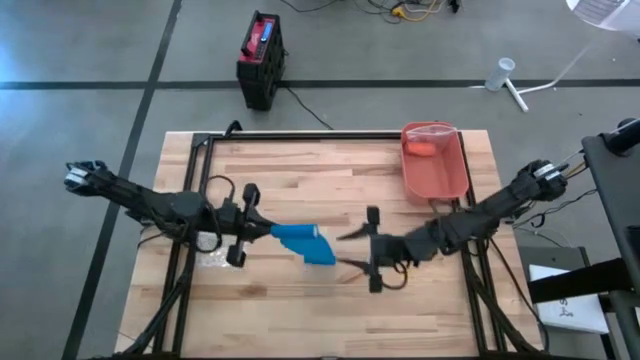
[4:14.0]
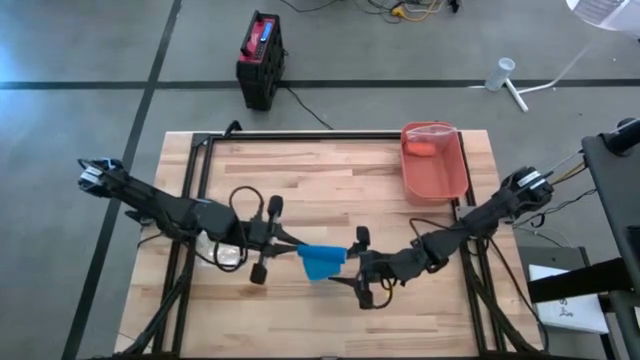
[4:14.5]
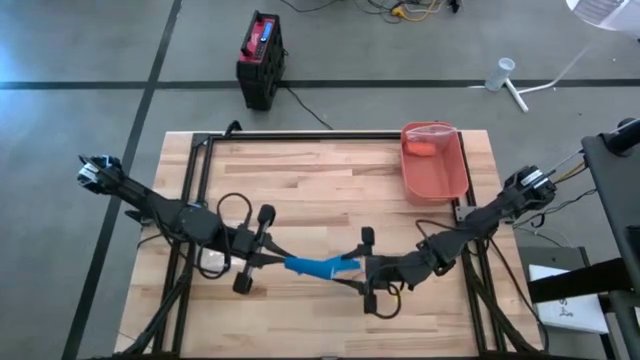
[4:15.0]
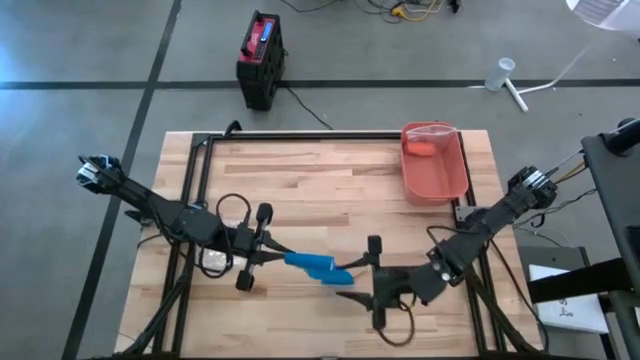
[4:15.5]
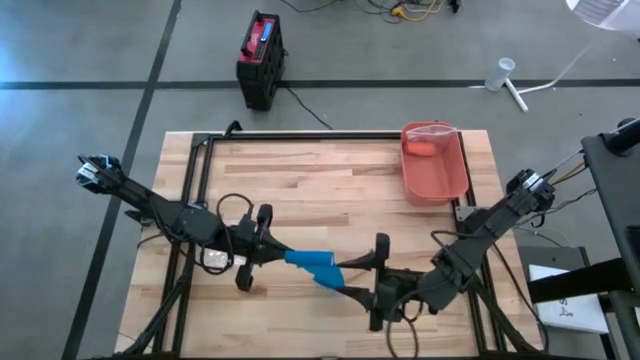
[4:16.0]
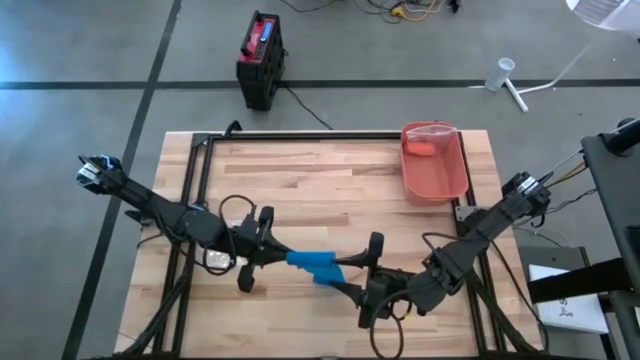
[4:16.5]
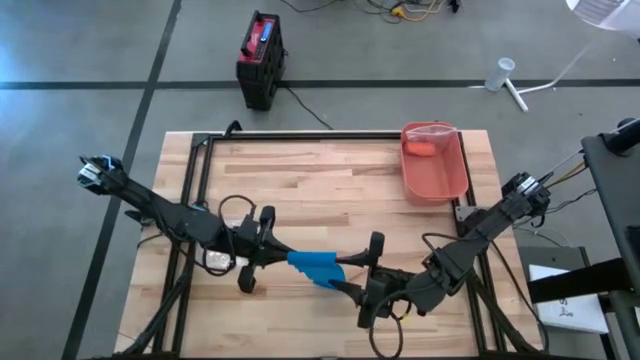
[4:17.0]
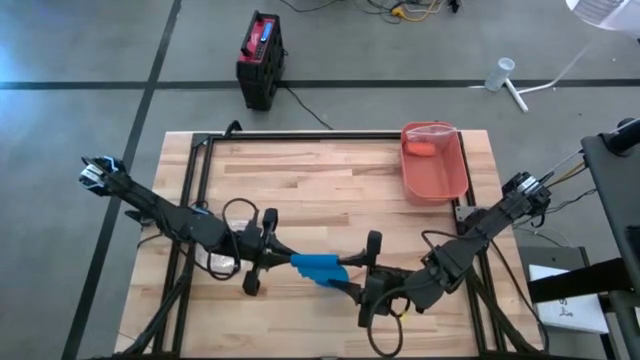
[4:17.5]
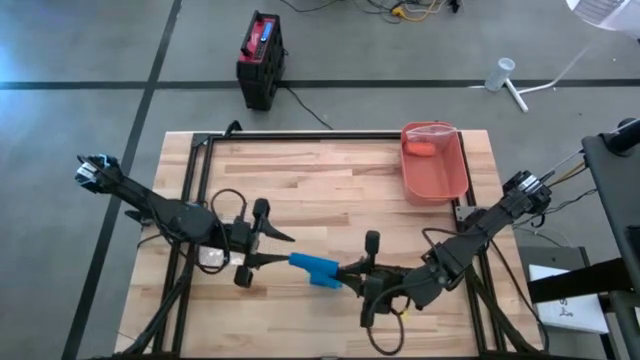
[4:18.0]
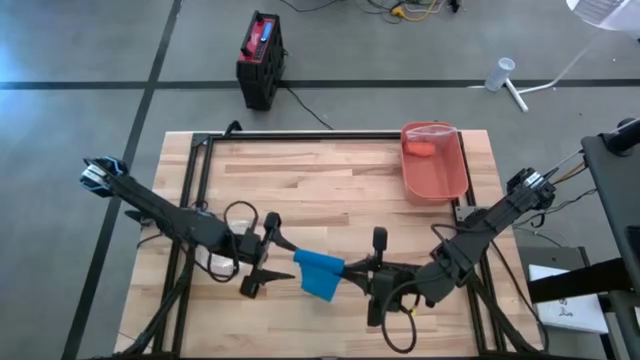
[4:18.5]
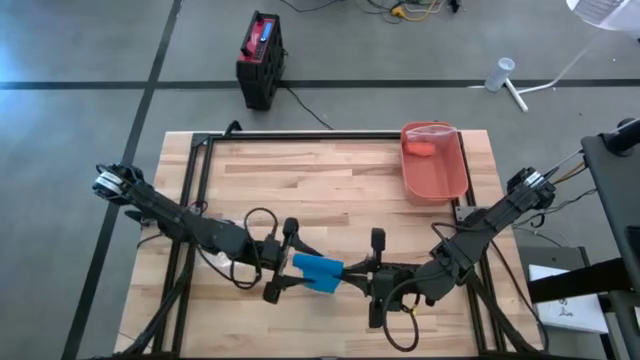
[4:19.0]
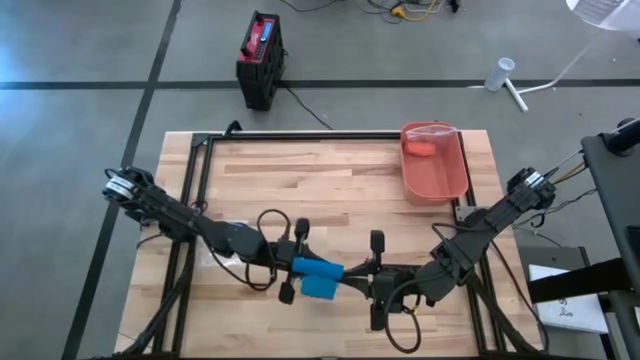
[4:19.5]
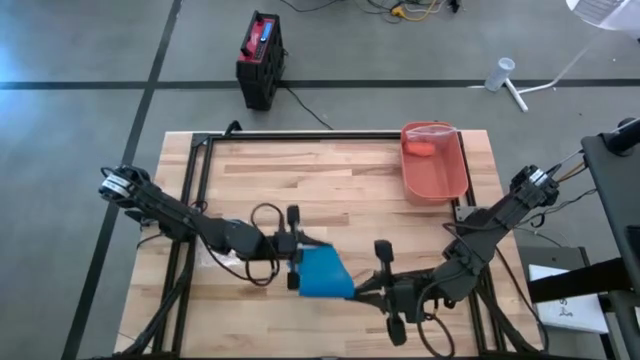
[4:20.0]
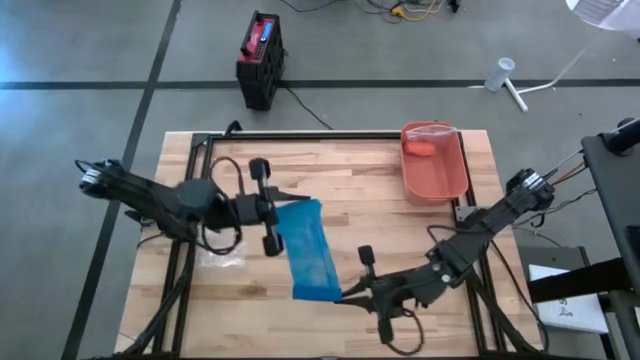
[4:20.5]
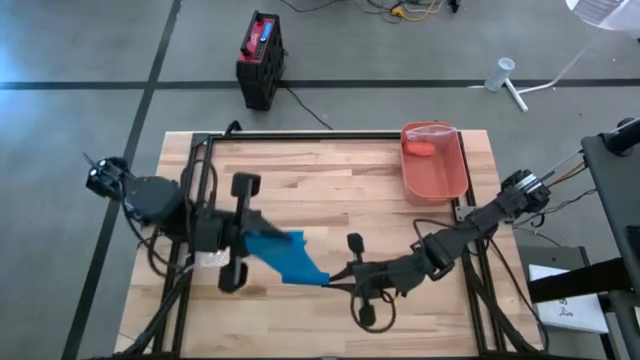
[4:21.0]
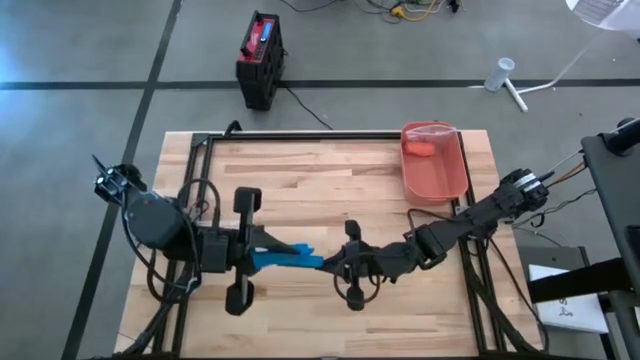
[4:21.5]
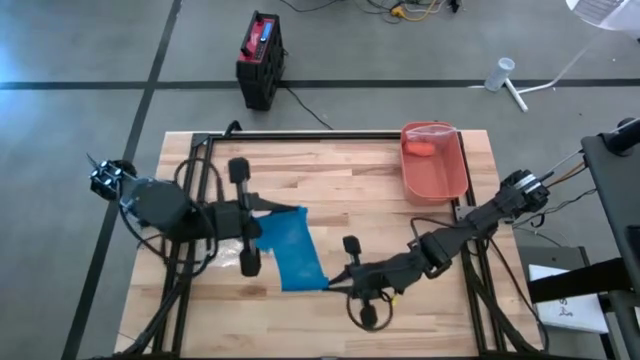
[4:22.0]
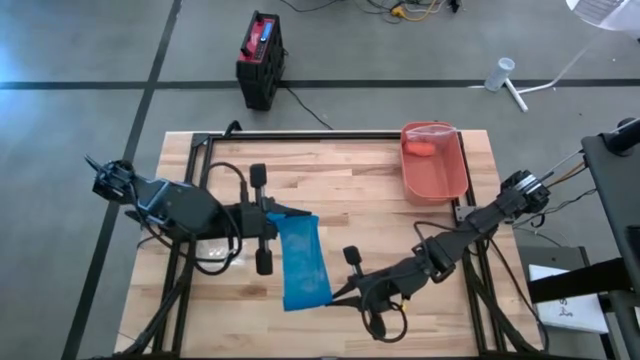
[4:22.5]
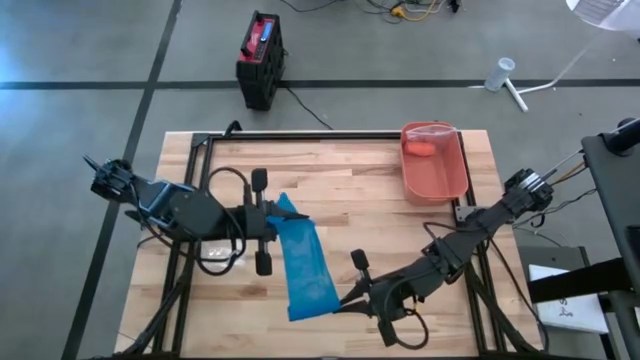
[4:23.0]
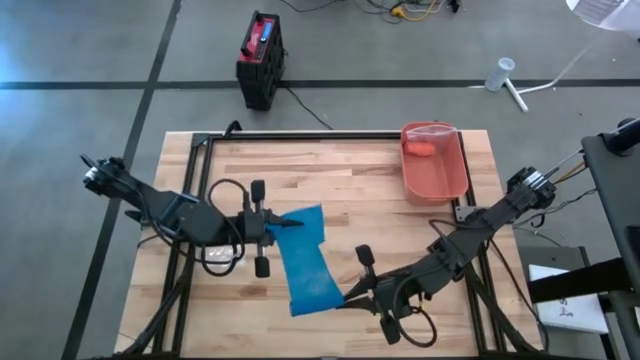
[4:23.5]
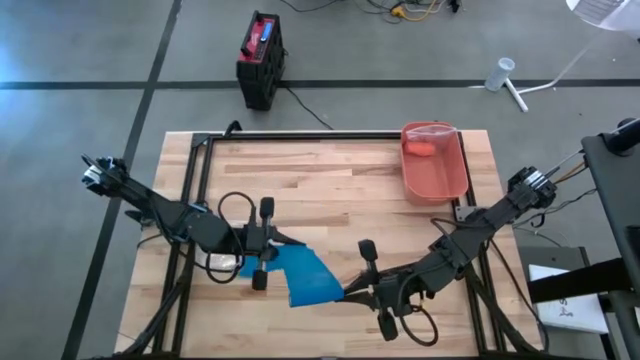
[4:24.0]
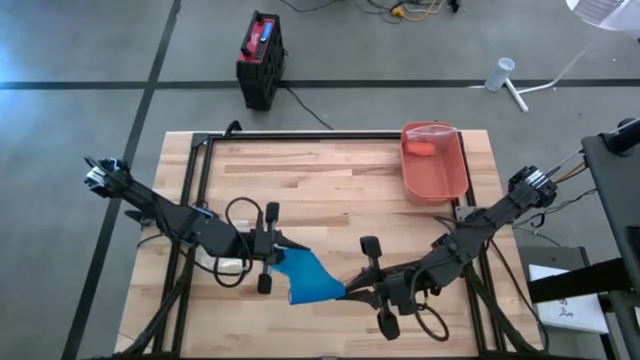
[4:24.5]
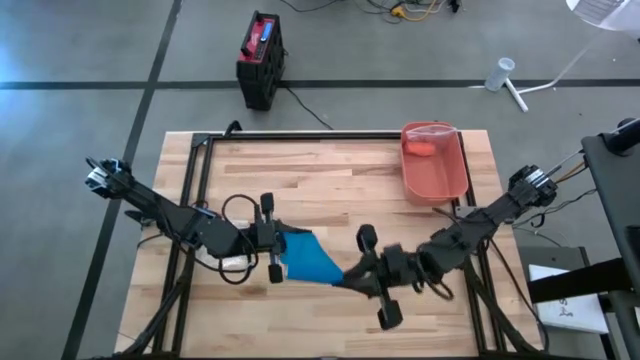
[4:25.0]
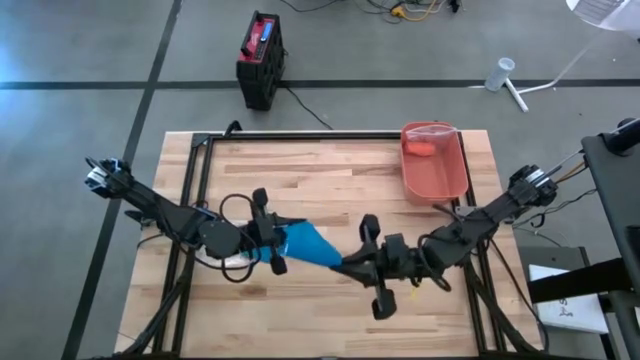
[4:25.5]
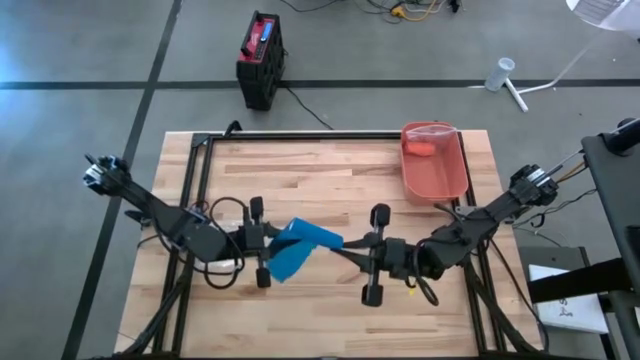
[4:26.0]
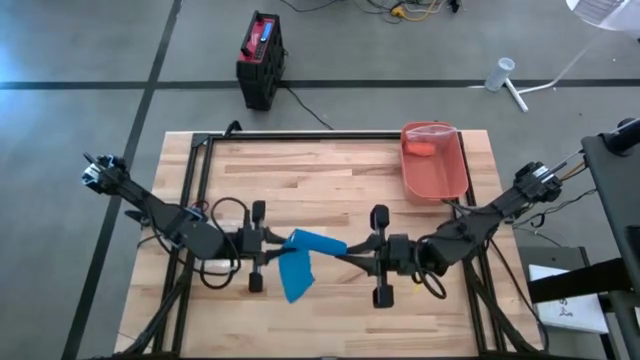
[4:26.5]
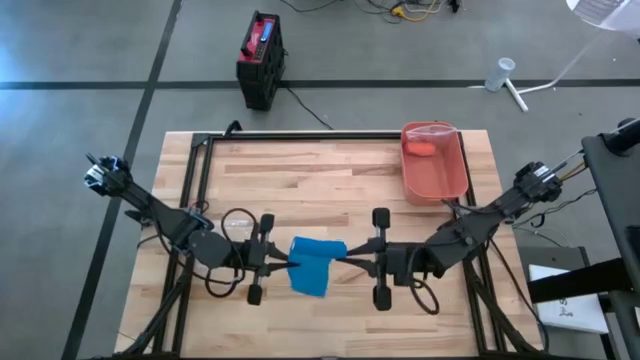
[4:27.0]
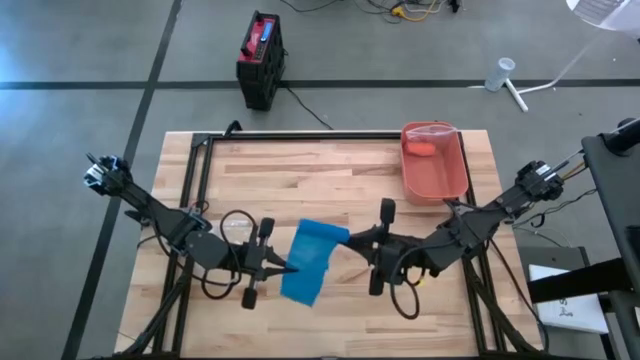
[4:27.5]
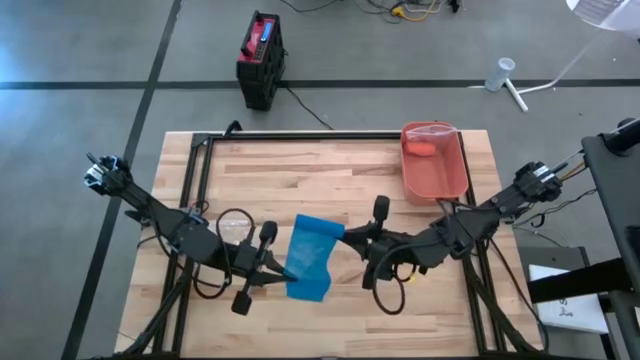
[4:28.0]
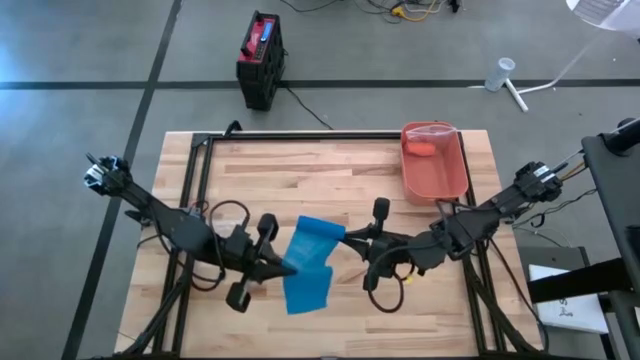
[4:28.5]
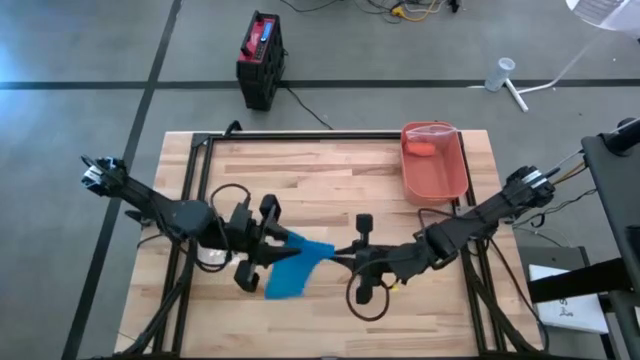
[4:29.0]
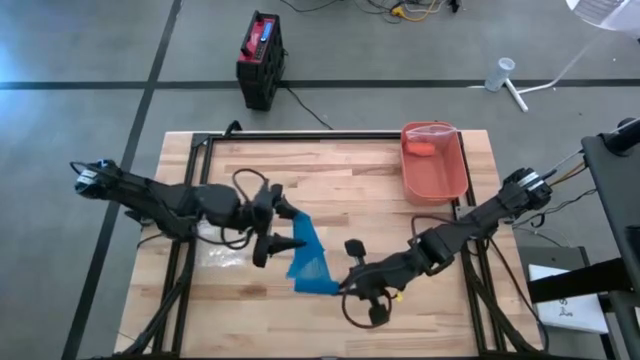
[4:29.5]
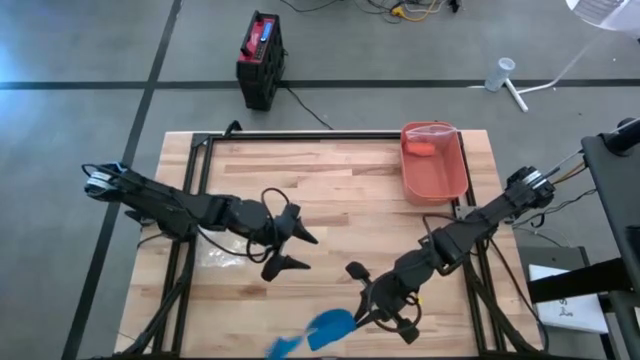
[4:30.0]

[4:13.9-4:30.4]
Task: Roll bandage
Roll the blue bandage

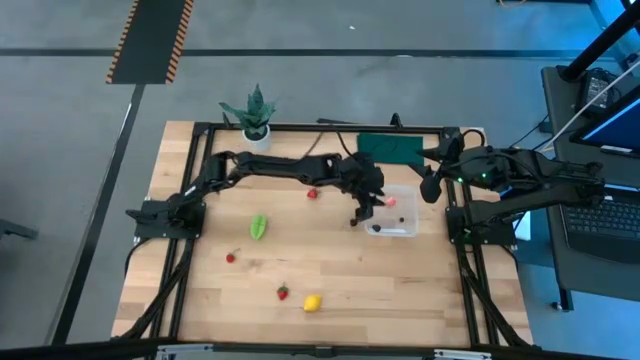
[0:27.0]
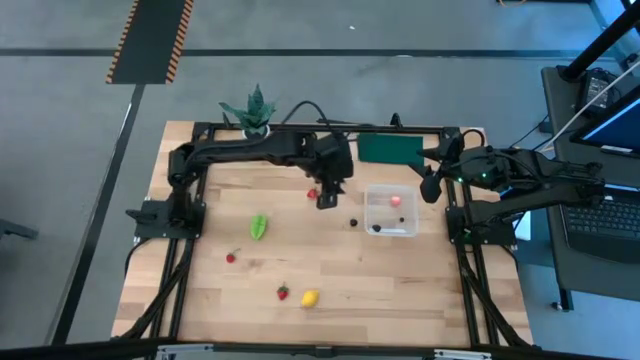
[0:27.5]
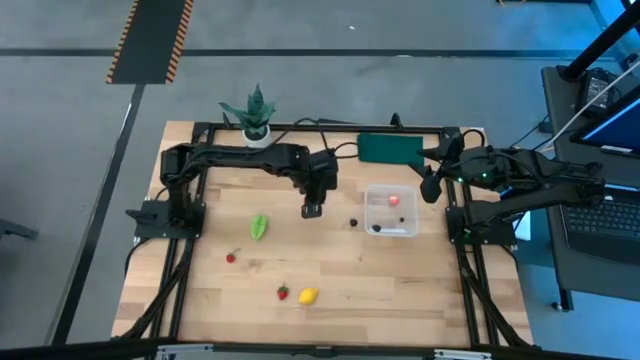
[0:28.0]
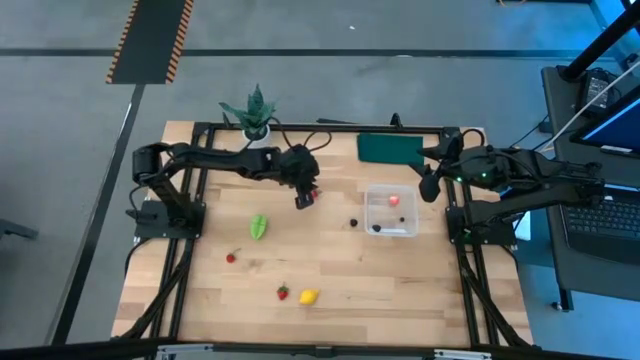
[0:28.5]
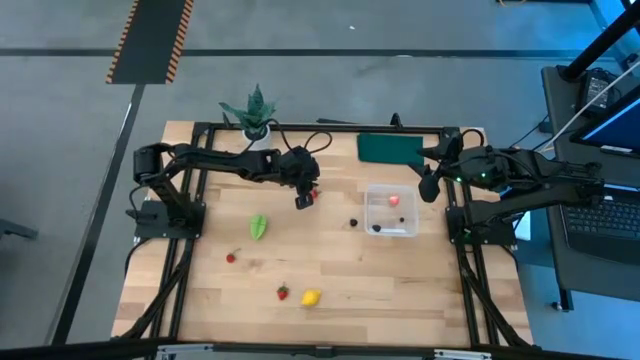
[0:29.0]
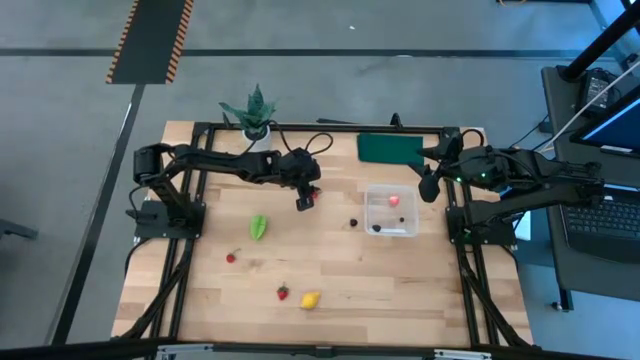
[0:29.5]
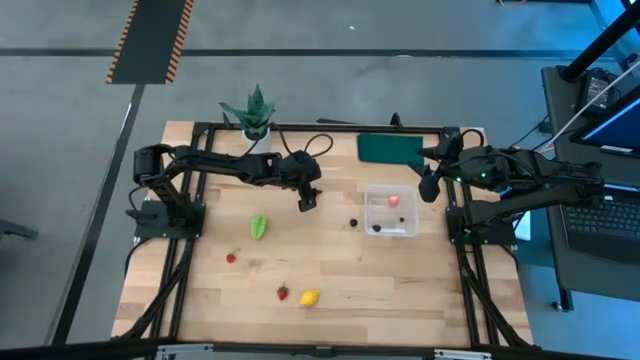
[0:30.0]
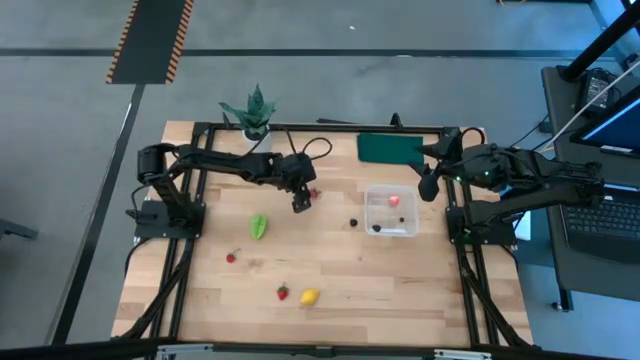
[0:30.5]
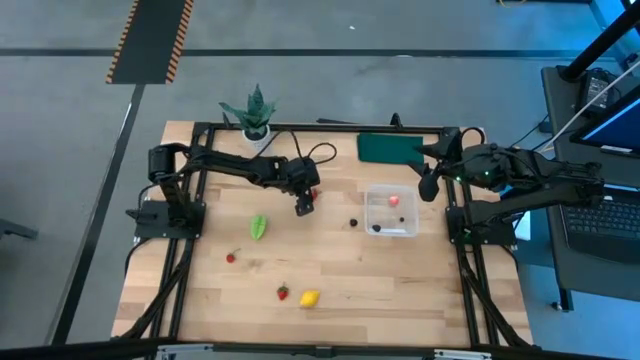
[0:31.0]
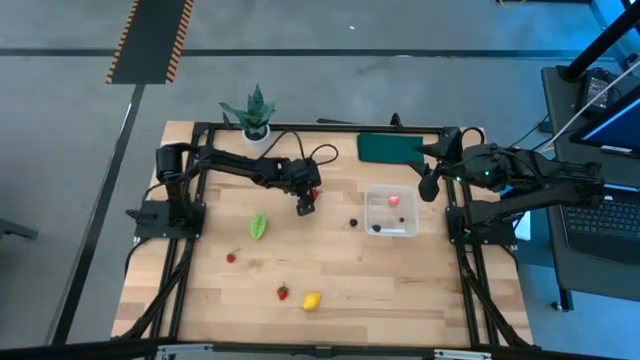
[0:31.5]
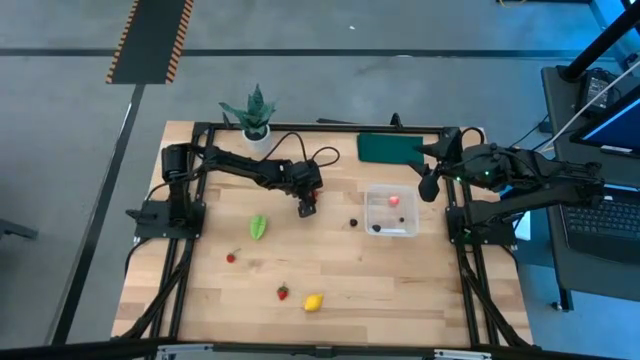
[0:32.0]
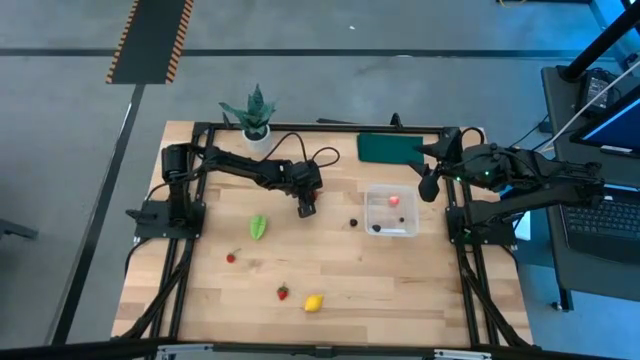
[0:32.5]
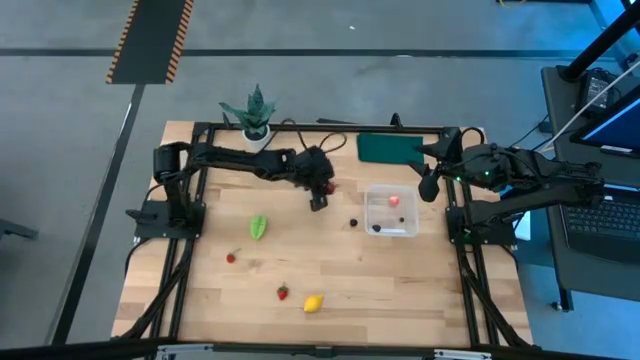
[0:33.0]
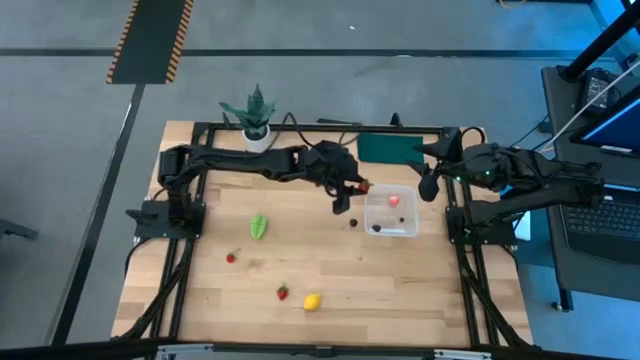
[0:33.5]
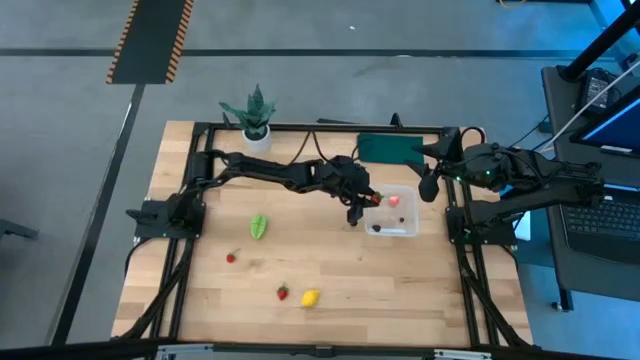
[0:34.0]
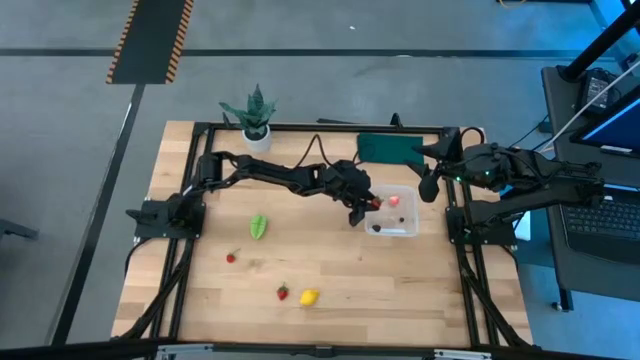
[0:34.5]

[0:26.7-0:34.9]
Task: Pick and placing Produce into tupperware
Put the top red strawberry into the transparent container
